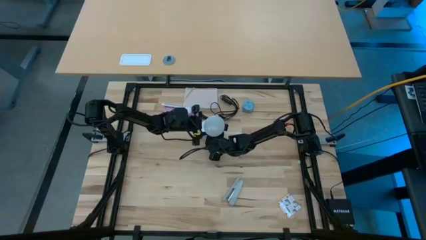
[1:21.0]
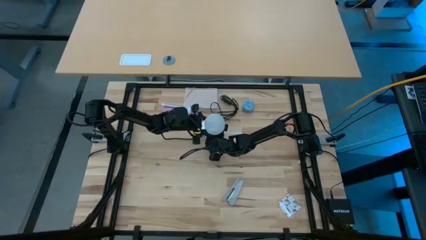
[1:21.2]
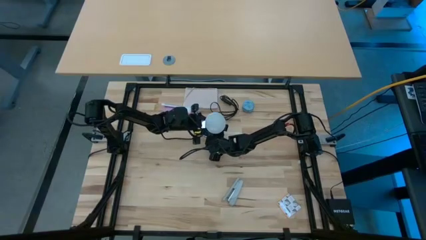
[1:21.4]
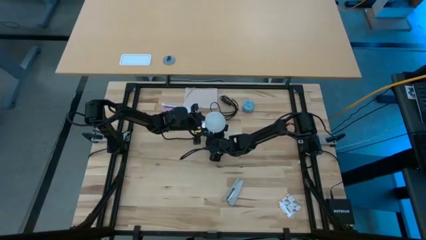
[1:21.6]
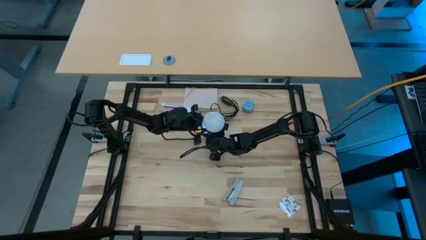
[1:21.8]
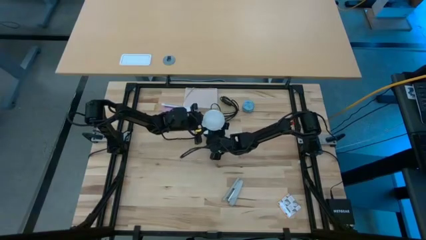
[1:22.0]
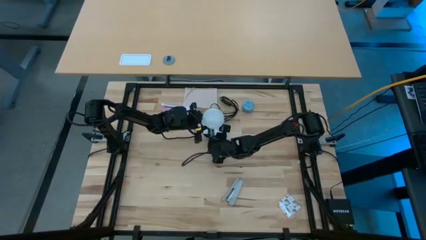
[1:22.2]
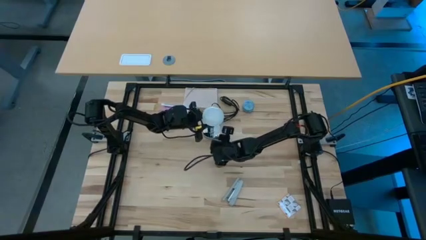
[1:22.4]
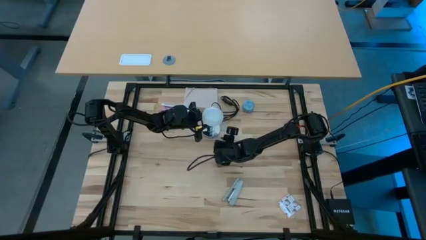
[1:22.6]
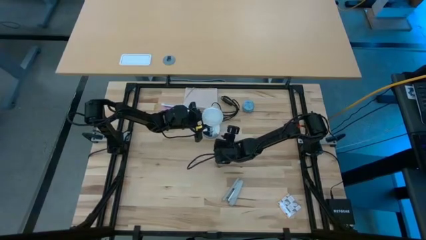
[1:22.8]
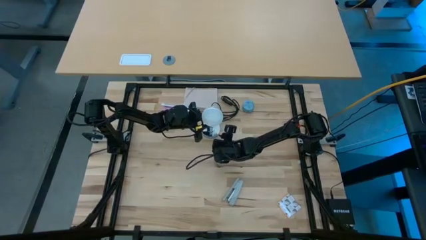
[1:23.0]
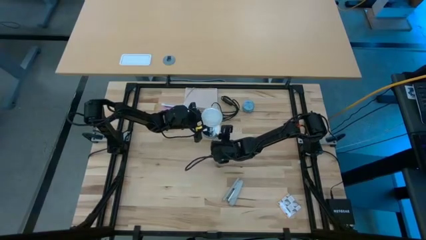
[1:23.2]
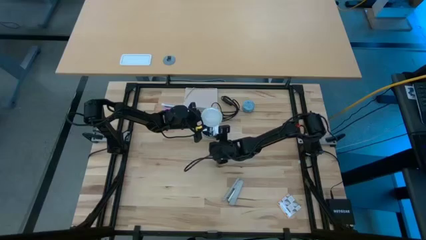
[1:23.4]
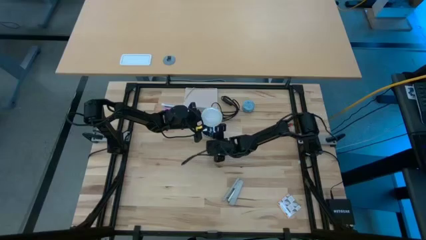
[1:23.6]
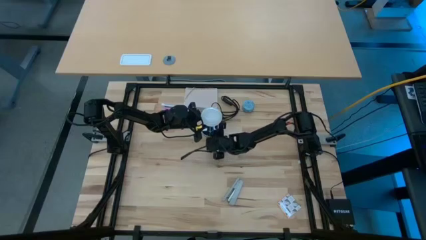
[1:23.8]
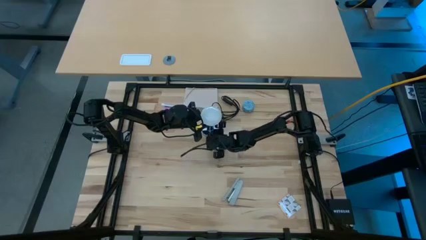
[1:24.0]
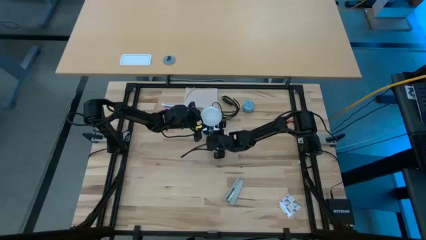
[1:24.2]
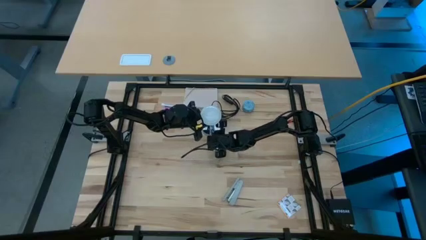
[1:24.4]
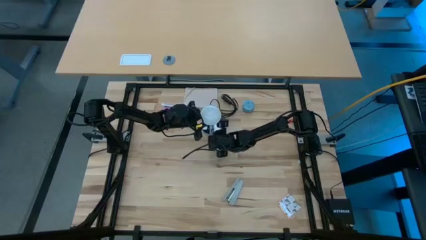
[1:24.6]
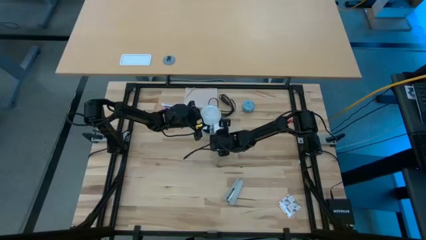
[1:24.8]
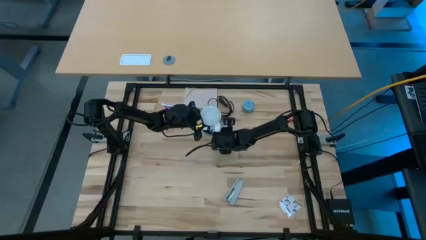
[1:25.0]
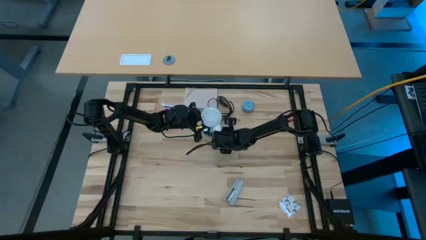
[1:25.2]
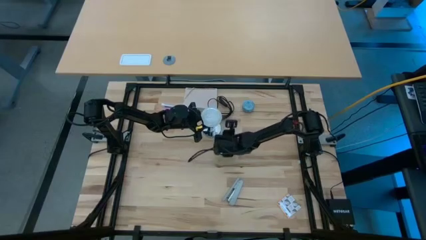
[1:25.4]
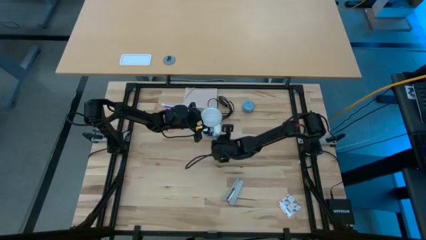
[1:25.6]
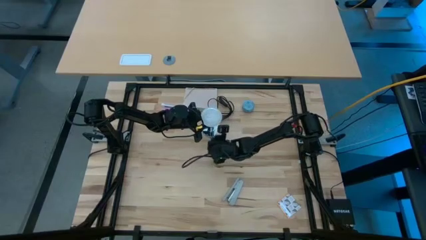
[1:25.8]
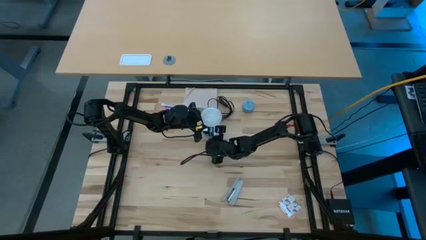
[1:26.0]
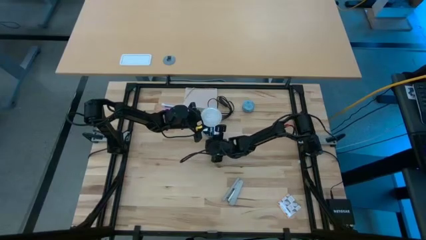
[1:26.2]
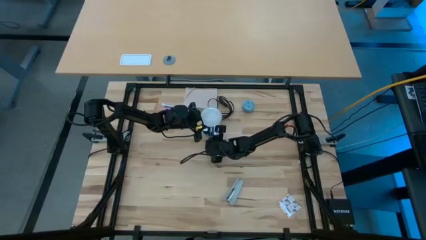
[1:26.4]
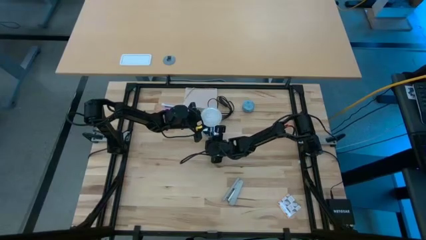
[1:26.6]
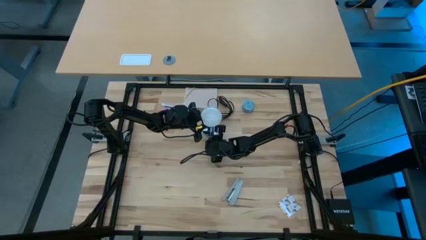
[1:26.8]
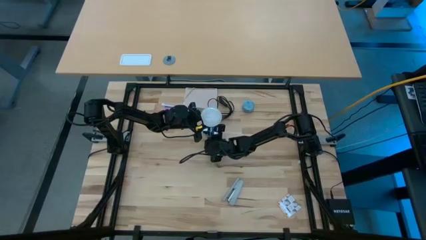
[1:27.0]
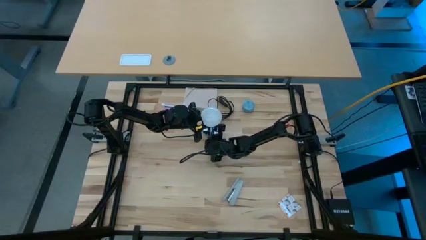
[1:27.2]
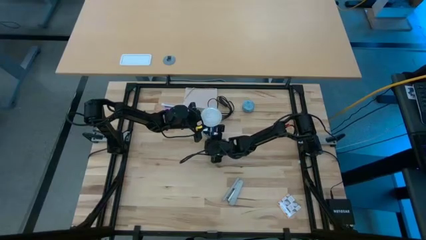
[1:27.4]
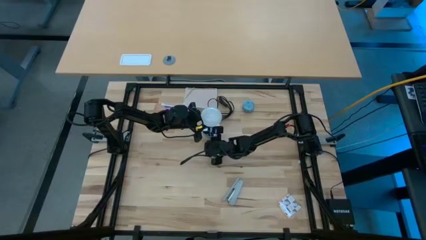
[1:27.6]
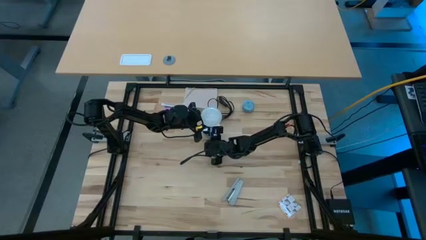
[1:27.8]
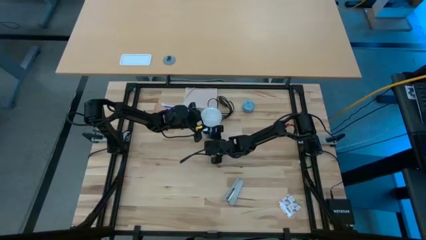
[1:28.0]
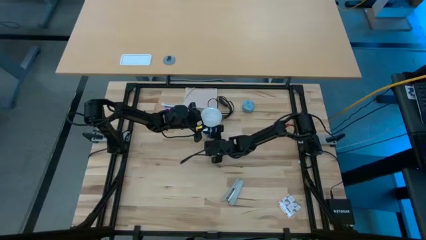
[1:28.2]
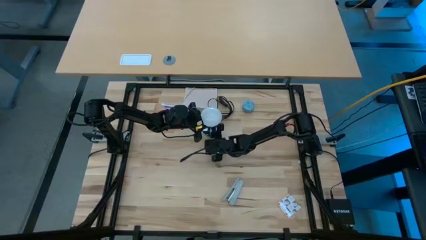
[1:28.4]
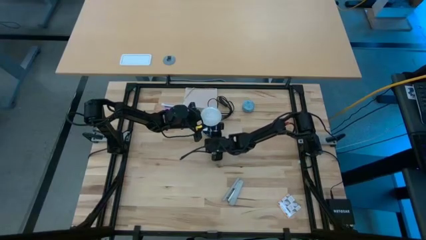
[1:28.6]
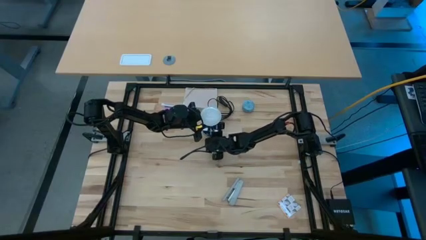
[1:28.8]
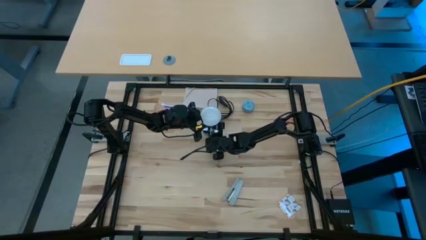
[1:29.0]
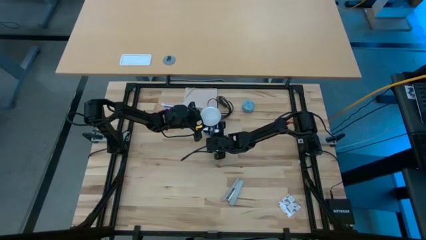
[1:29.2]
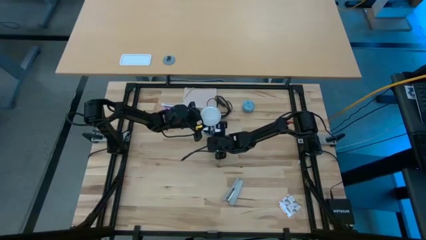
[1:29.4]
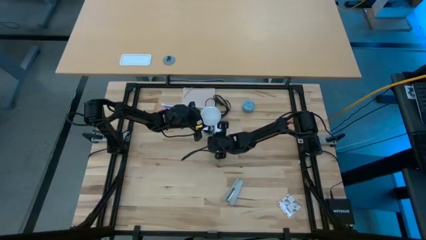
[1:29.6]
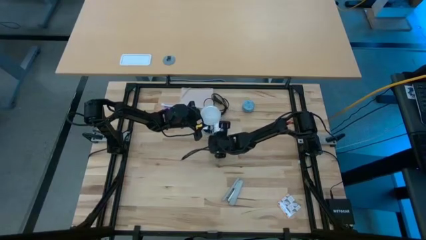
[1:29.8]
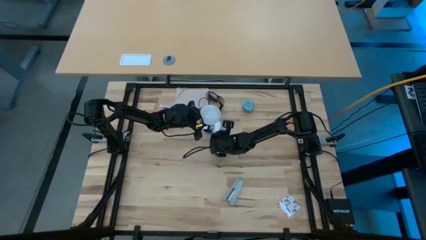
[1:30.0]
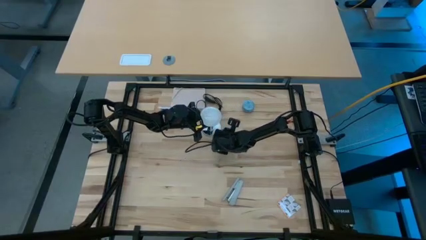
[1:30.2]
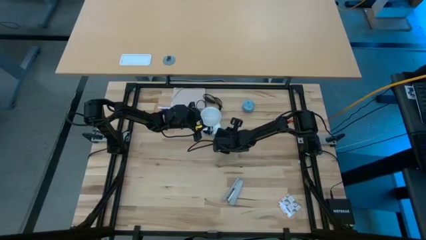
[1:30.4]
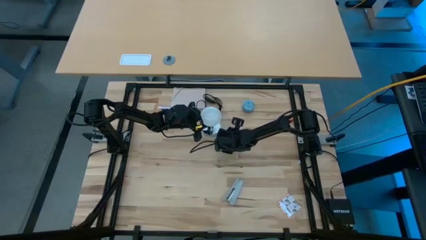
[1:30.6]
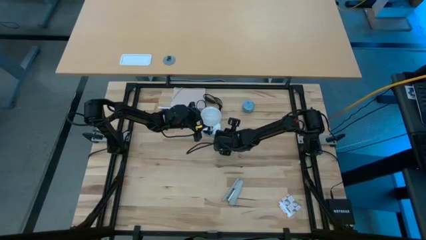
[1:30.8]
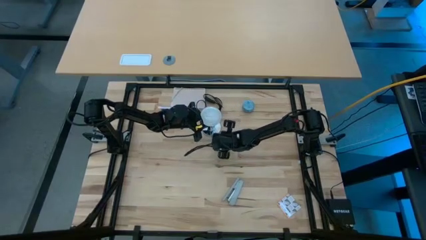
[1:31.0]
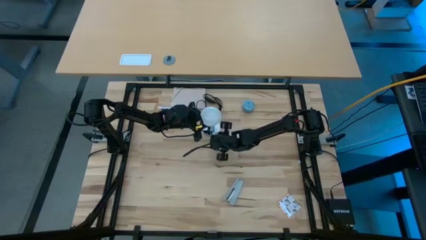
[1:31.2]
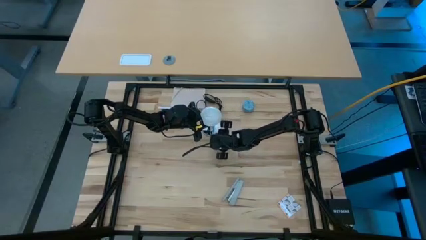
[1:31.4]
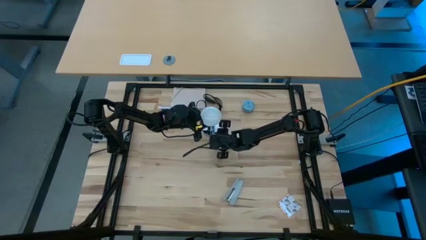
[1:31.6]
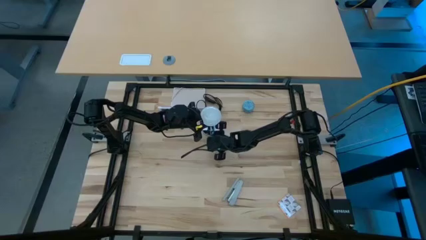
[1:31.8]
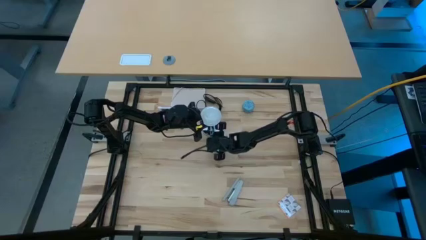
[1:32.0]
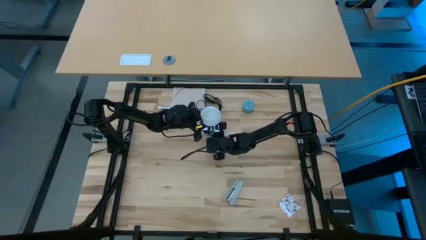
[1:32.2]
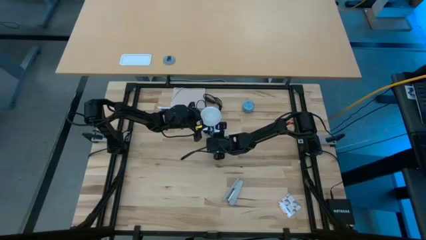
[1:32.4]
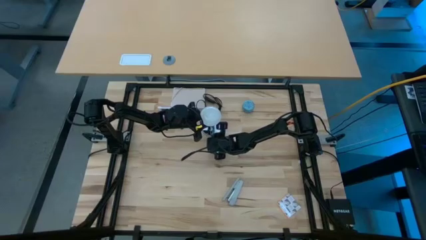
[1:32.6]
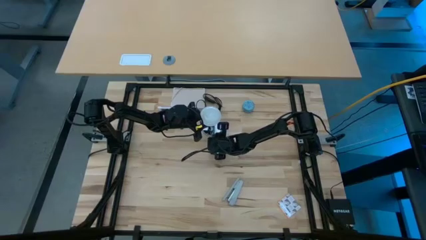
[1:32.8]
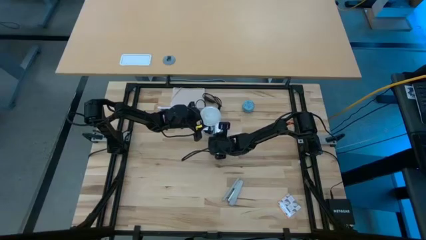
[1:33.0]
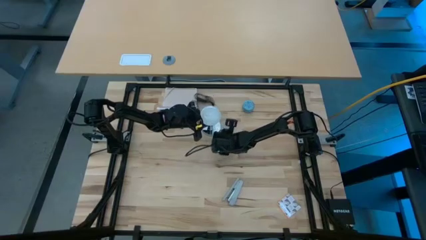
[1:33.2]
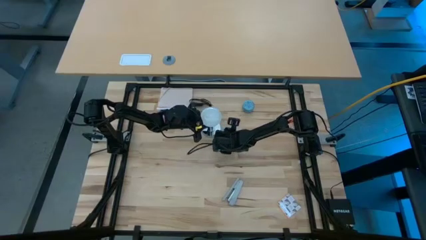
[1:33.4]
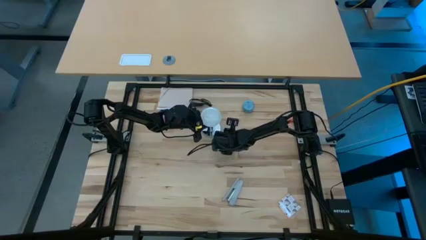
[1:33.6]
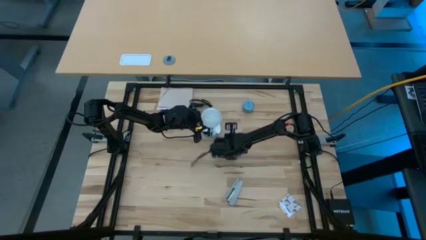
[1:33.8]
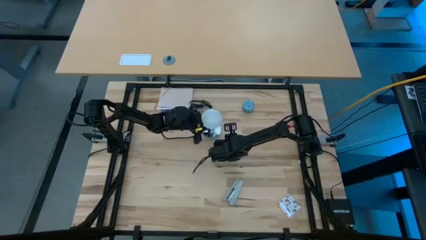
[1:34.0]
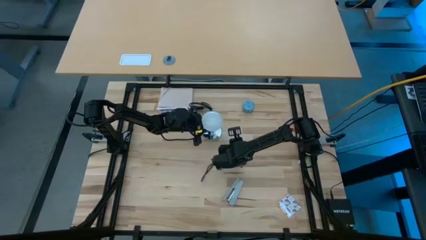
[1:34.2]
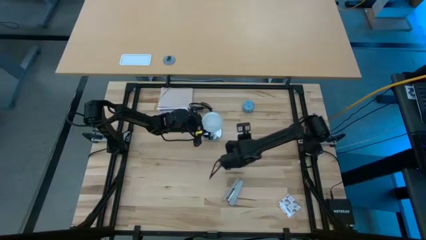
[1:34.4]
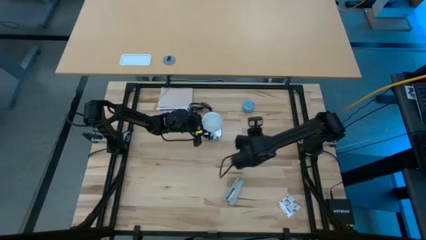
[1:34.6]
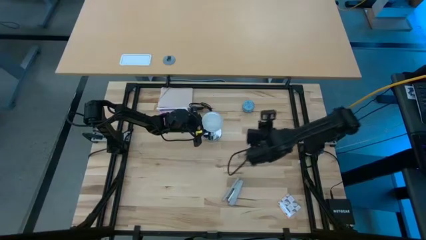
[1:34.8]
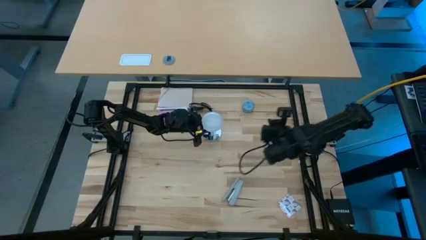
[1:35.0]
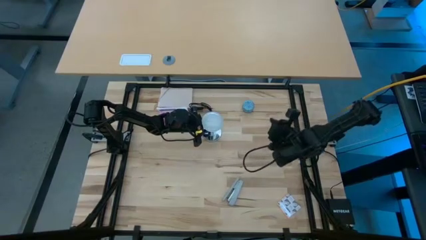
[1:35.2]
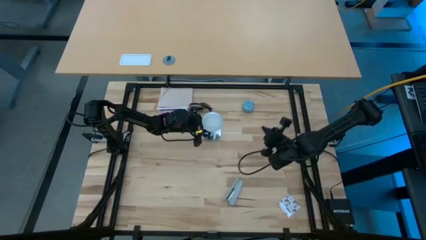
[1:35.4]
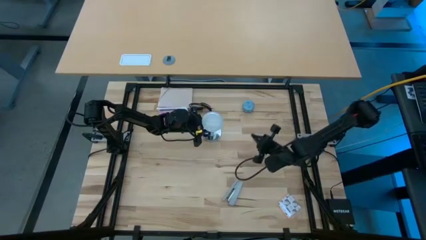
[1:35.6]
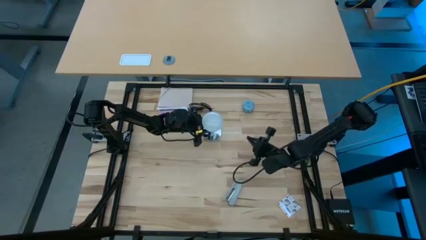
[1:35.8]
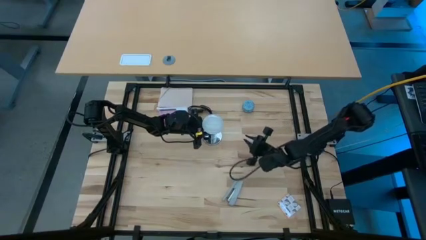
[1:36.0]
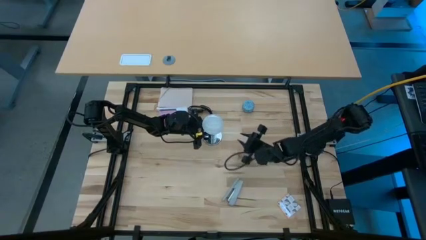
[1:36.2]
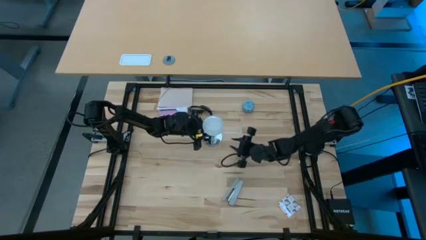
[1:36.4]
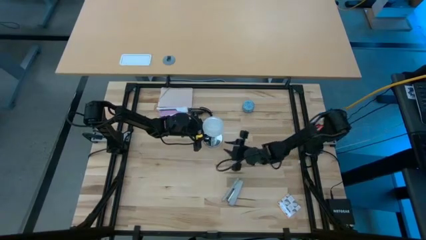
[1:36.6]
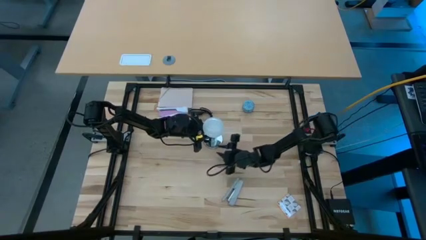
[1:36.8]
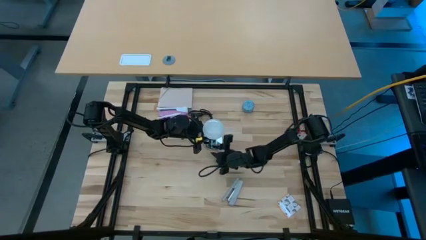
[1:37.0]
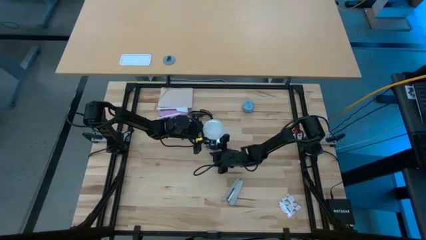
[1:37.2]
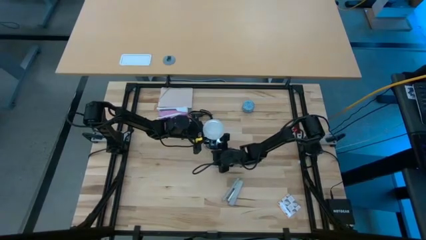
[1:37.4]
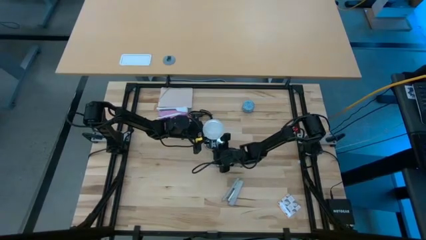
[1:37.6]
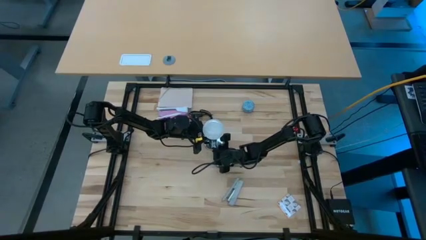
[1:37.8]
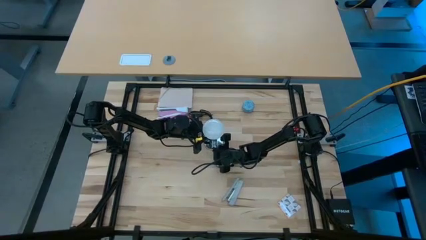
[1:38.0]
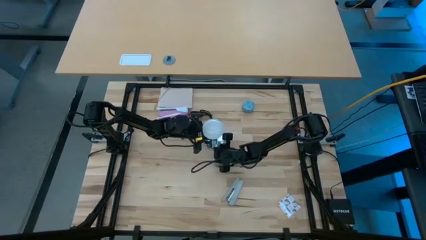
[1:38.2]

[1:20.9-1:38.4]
Task: Screw lightbulb
Insert light bulb into the lamp
